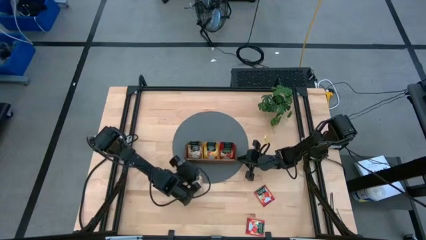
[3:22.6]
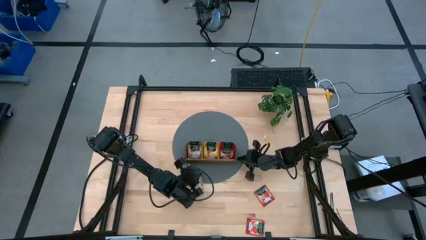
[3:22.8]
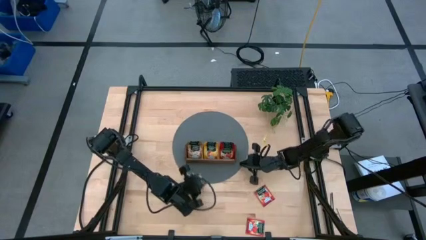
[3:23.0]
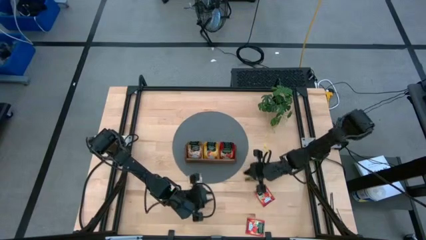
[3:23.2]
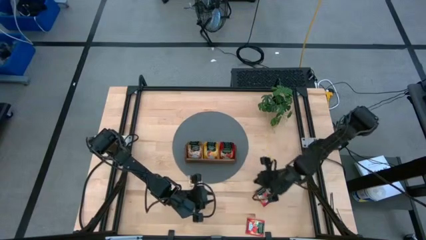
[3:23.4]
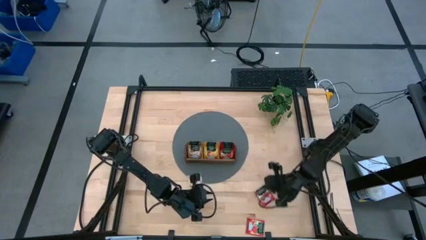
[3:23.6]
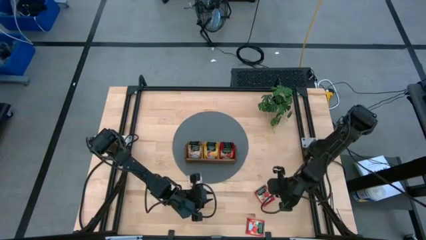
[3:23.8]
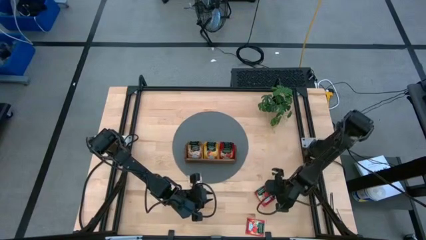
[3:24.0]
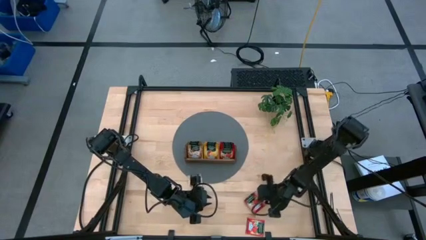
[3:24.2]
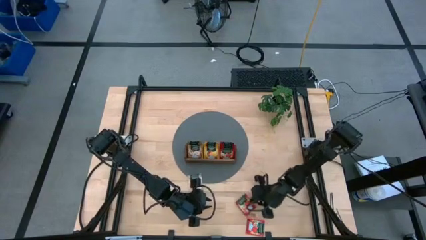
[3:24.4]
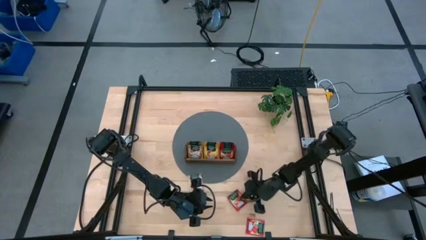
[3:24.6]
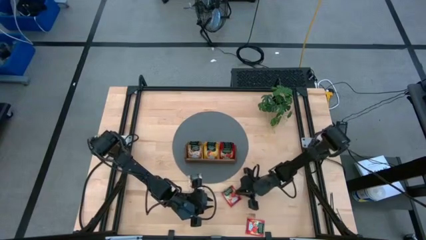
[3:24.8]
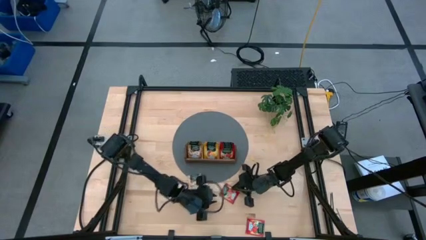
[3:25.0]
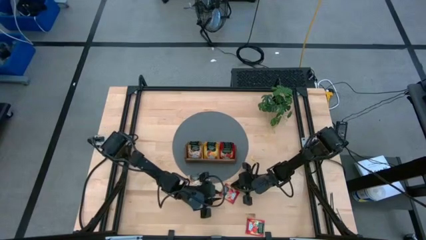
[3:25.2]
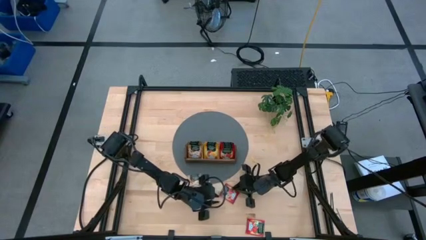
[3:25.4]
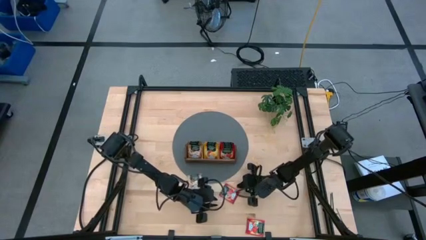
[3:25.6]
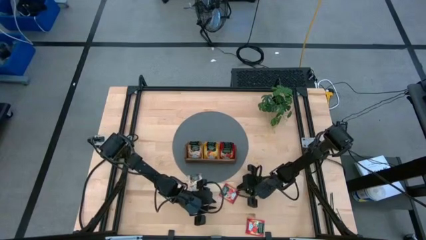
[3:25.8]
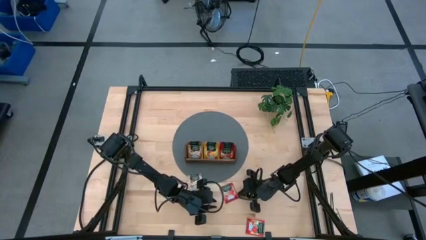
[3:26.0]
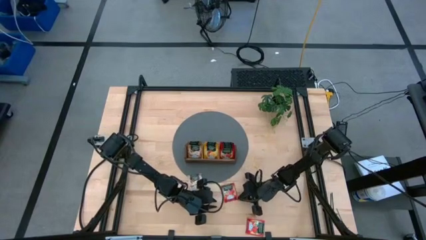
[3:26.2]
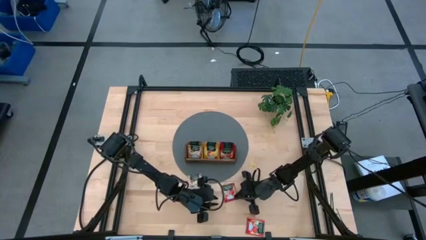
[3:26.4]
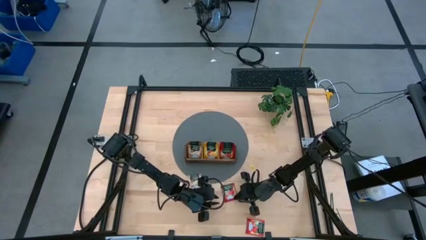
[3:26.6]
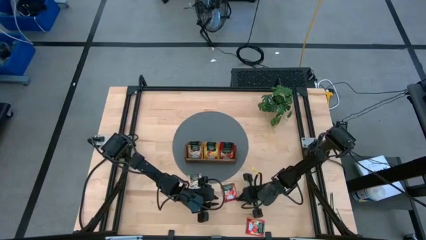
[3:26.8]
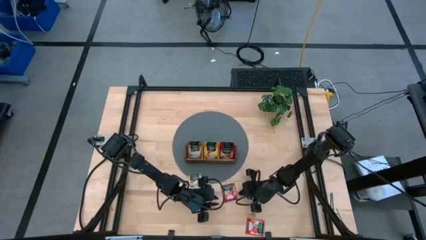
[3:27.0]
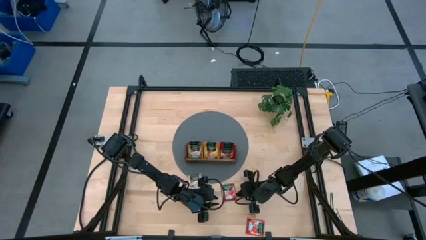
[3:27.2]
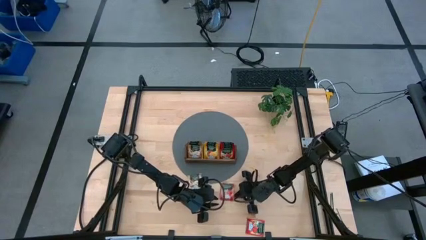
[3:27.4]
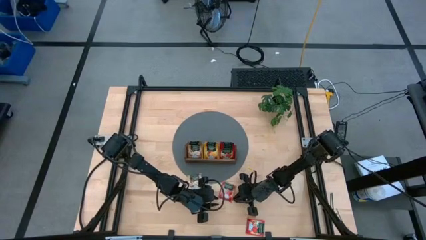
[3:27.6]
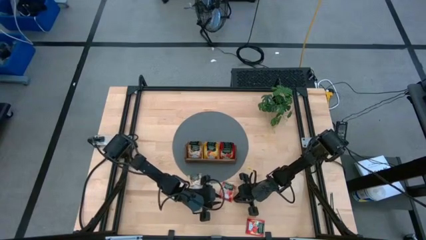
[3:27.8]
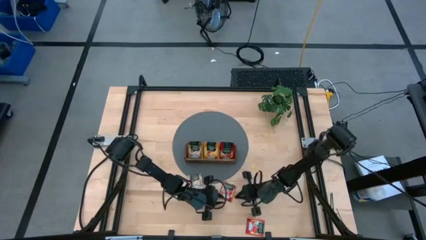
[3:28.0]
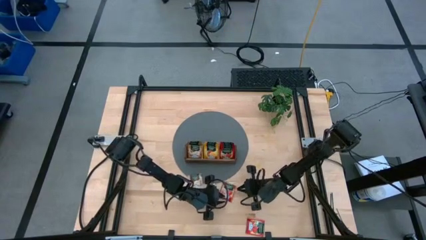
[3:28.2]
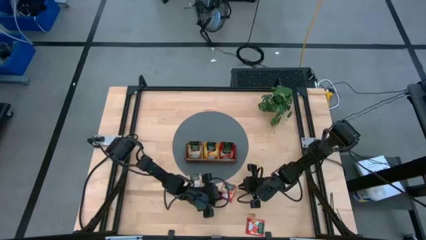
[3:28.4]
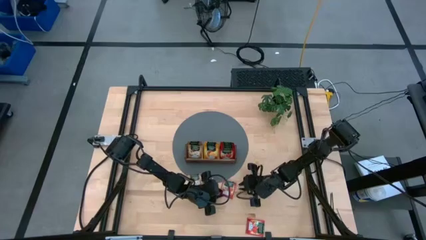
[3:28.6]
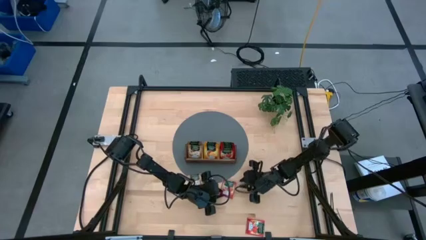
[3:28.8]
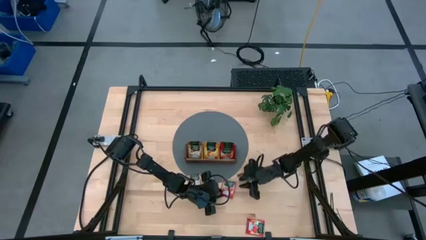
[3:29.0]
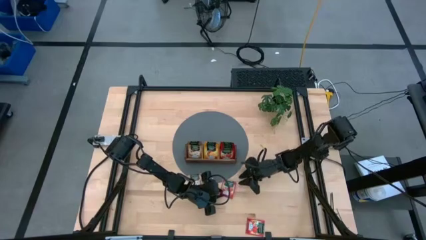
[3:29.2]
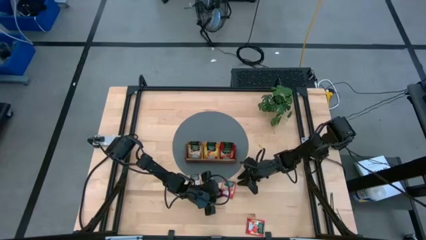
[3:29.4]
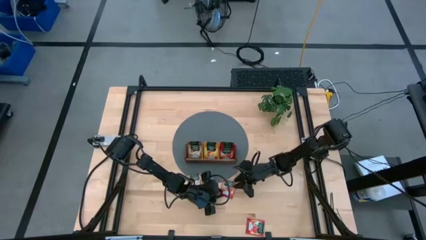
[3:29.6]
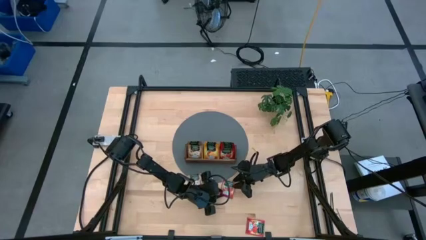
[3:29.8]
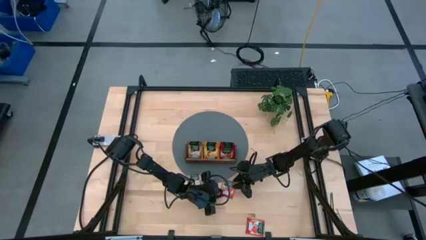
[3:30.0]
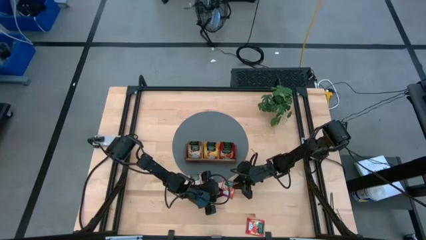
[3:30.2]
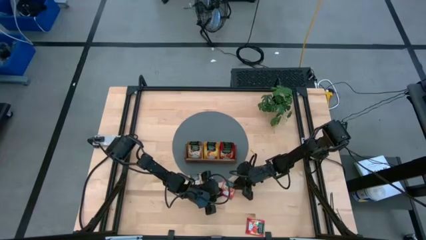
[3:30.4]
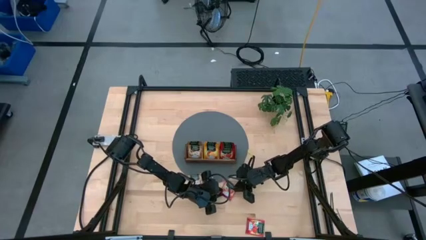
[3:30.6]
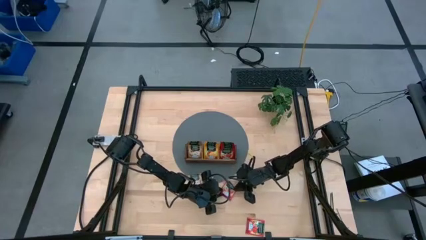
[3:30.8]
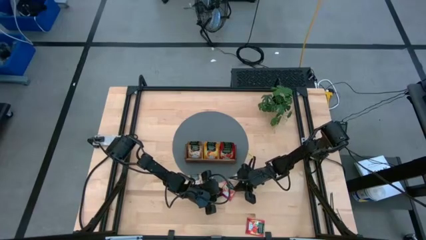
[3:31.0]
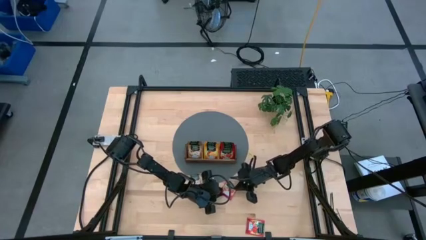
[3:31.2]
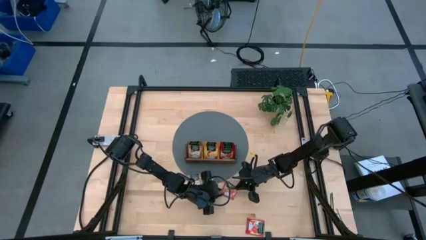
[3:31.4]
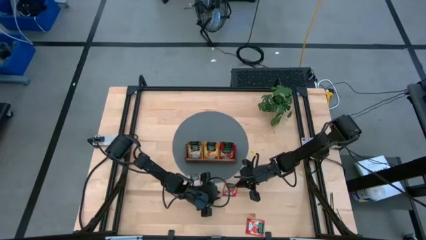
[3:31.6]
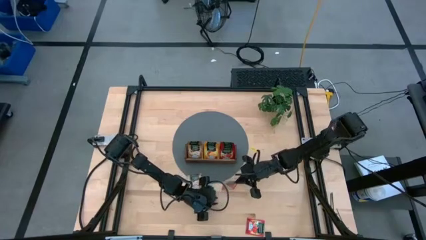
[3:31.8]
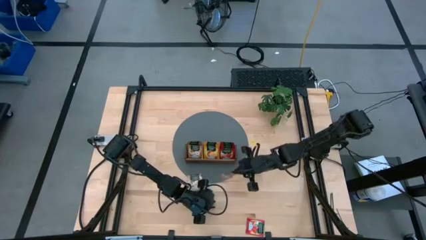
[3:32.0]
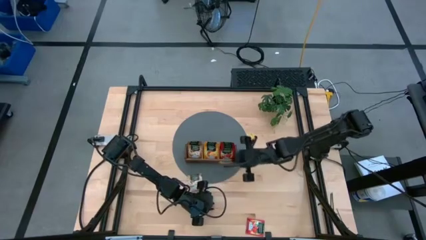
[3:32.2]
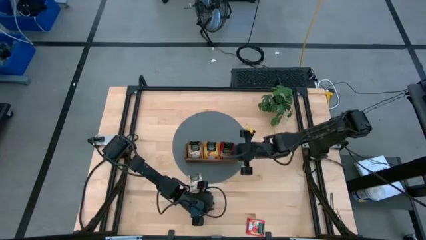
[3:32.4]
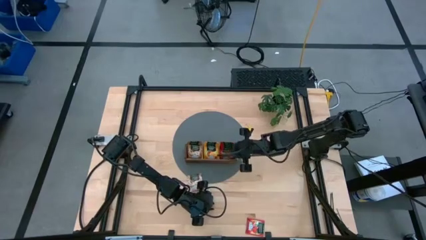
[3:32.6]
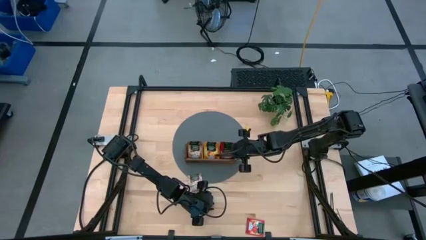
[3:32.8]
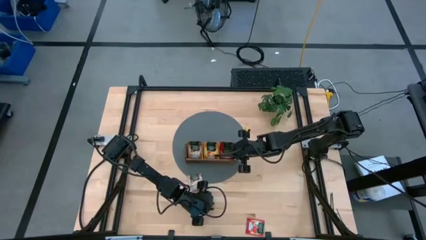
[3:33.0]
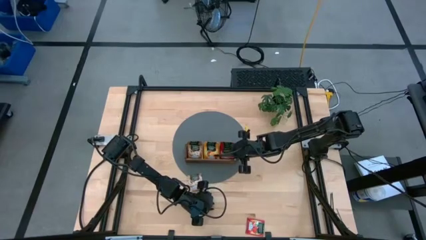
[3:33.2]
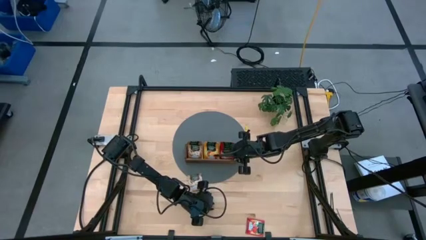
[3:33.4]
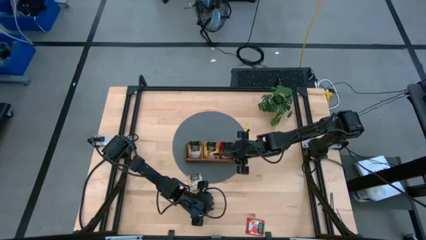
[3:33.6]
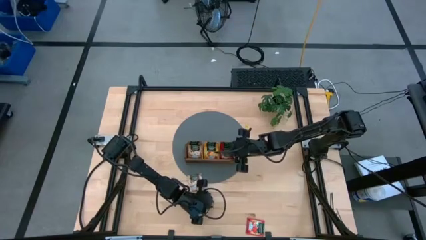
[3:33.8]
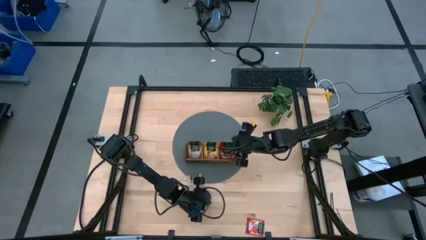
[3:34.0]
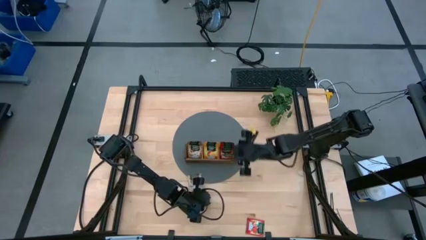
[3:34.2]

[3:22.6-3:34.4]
Task: Pick & Place Tea
Put the top red tea bag into the right section of the wooden organizer

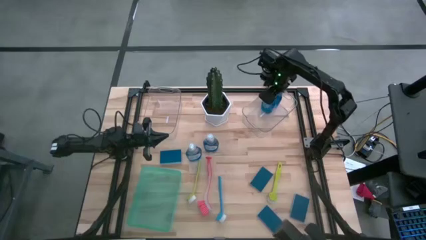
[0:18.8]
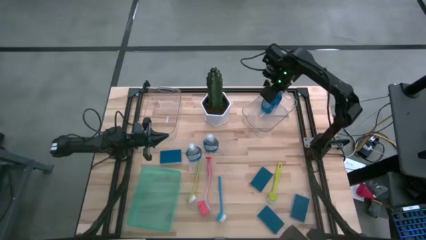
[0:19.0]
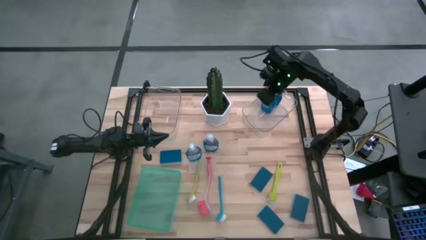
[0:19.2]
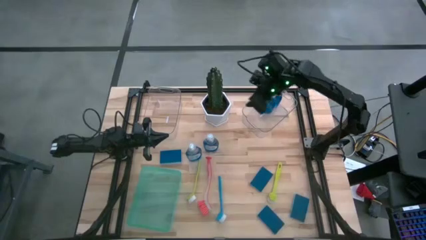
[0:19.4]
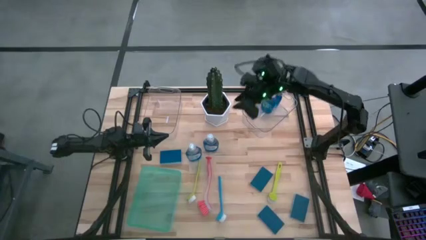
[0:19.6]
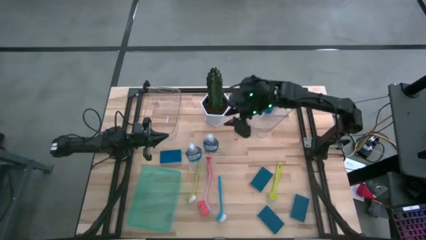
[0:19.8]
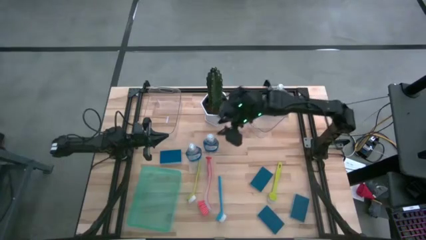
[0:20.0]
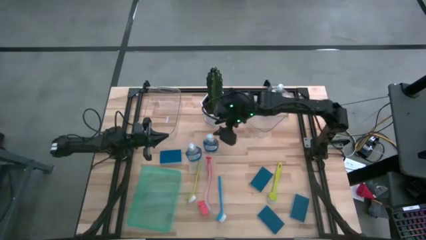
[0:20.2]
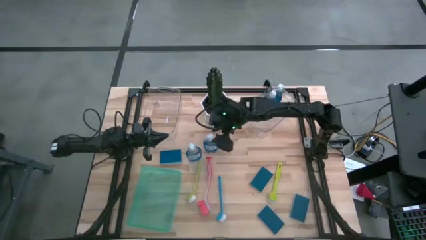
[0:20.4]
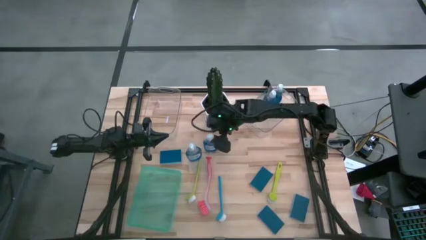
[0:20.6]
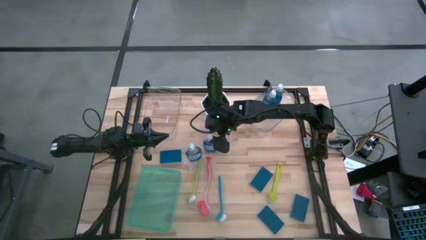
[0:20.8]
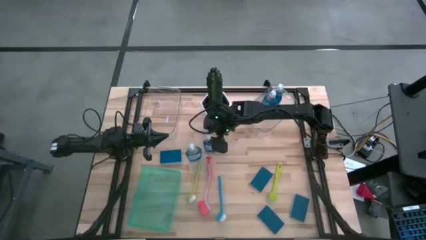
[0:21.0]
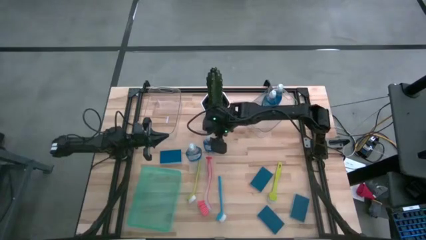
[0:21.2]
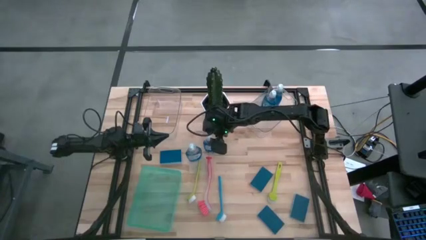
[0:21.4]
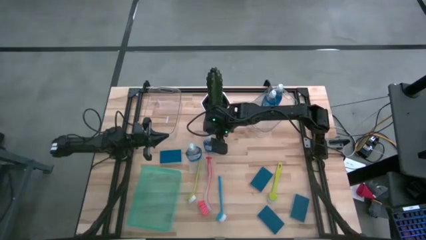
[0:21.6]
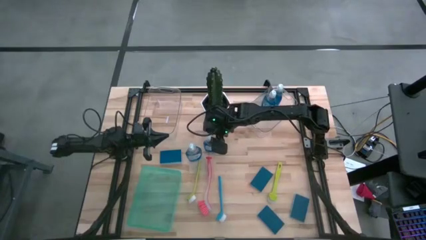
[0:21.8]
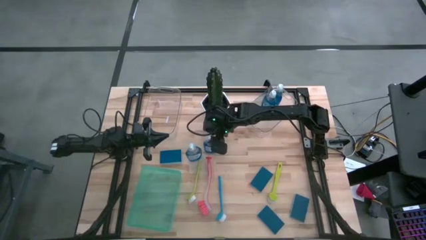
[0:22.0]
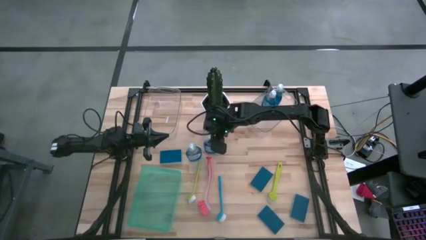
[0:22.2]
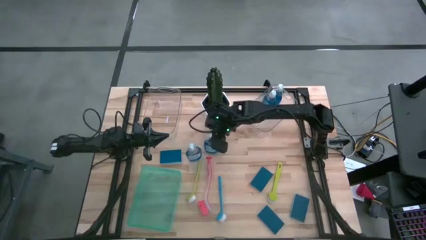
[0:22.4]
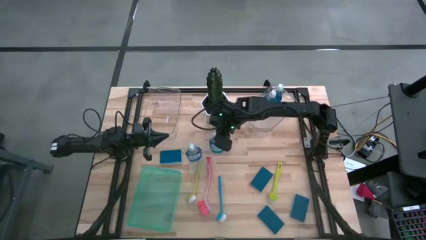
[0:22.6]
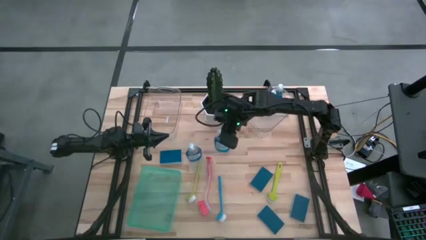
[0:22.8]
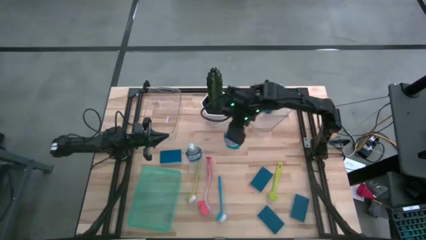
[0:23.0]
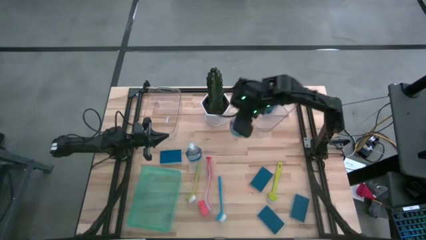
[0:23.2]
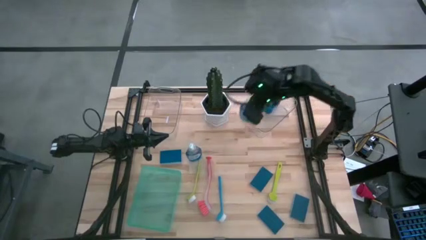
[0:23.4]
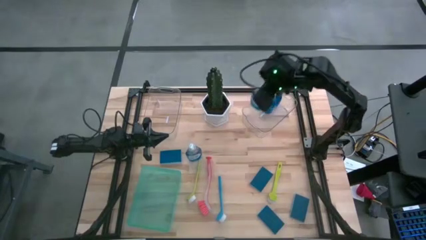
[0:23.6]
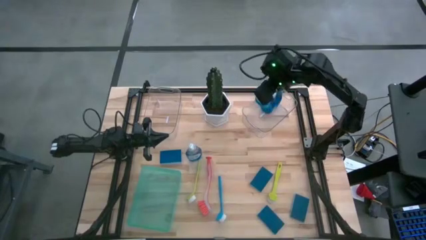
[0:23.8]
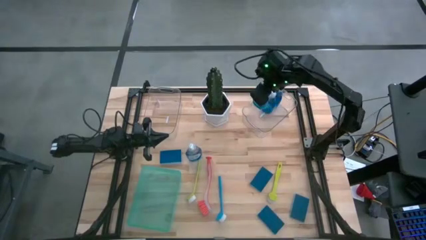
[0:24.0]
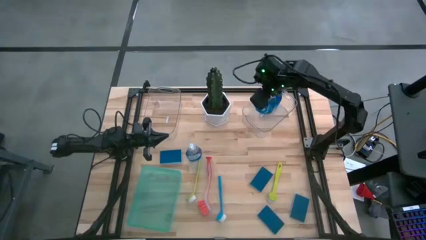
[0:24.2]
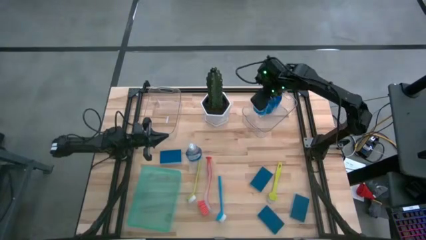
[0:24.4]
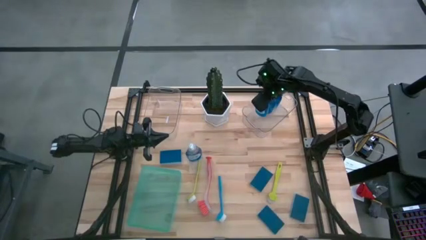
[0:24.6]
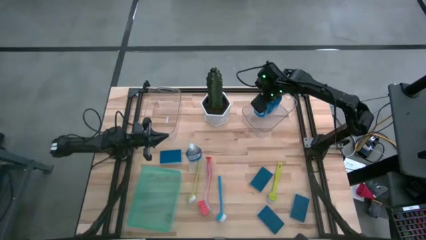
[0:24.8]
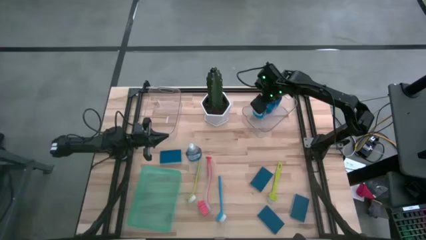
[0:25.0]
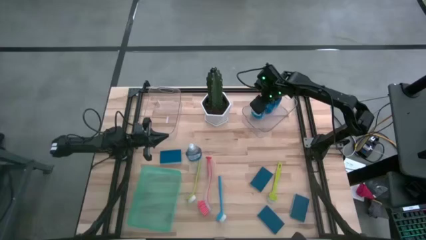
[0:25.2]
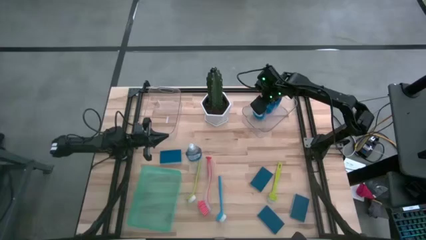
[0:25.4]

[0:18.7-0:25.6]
Task: Pick & Place Kitchen Sink Supplies
Put the dishwashing liquid bottle into the right transparent bin
